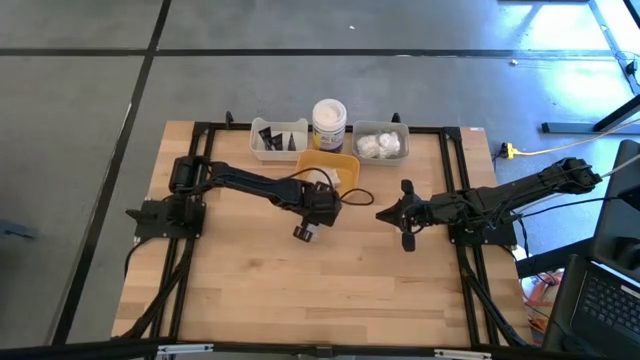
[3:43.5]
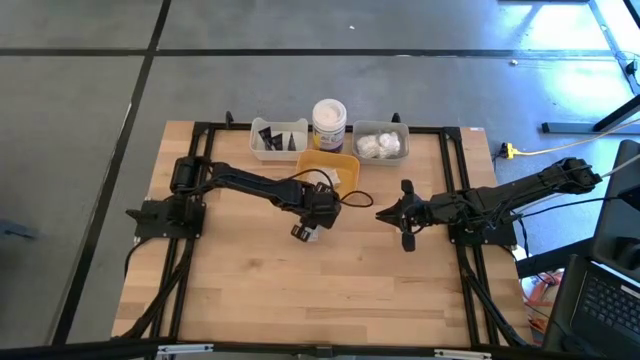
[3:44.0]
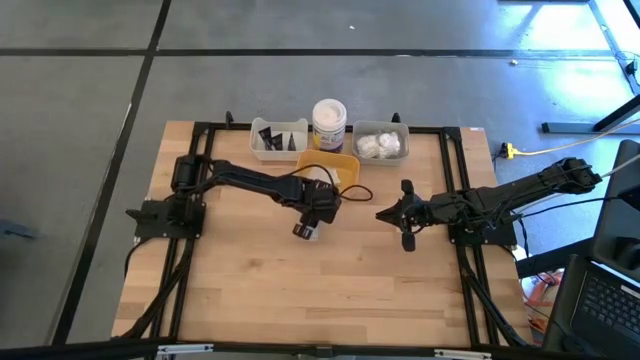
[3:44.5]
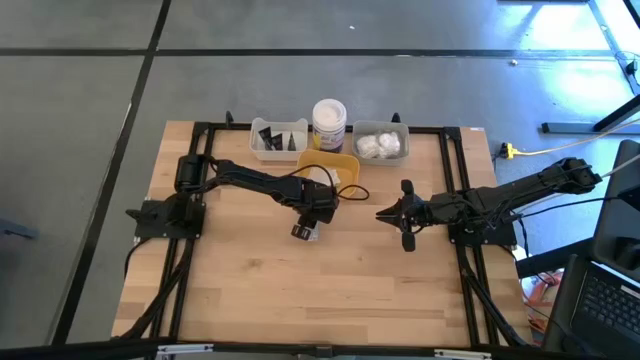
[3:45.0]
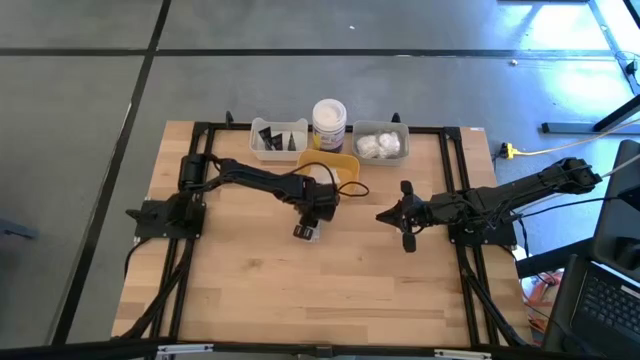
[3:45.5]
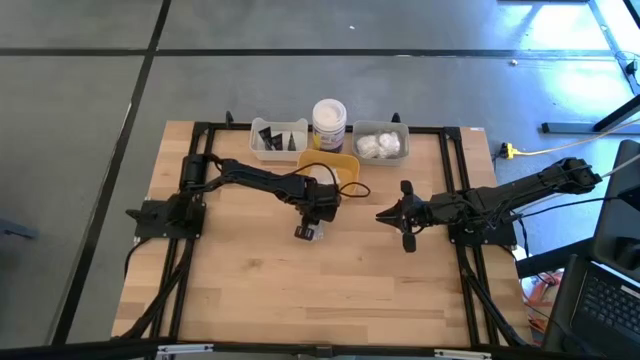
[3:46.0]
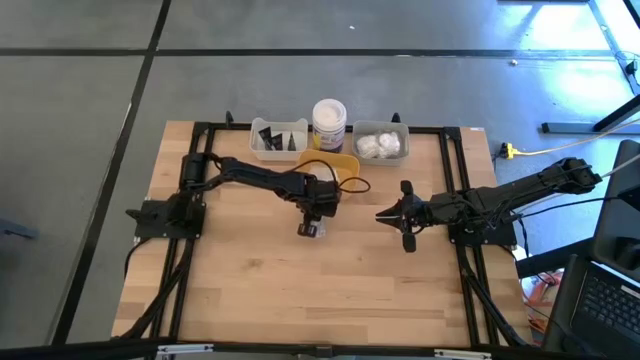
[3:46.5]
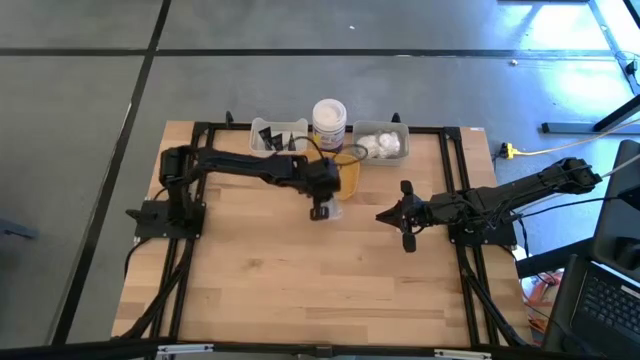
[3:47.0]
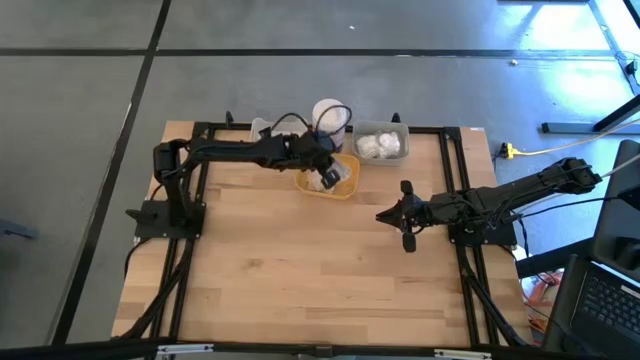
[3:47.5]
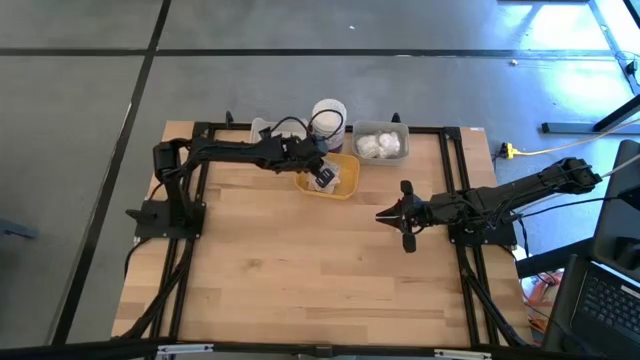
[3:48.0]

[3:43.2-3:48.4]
Task: Pick & Place Travel size toiletries
Put the white bandage into the yellow bin

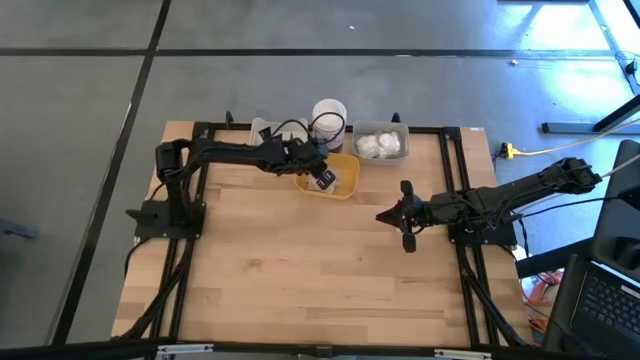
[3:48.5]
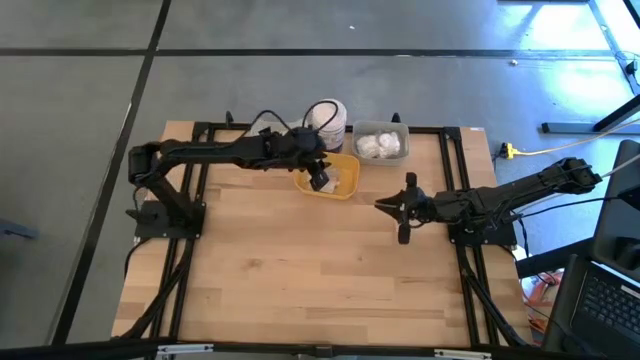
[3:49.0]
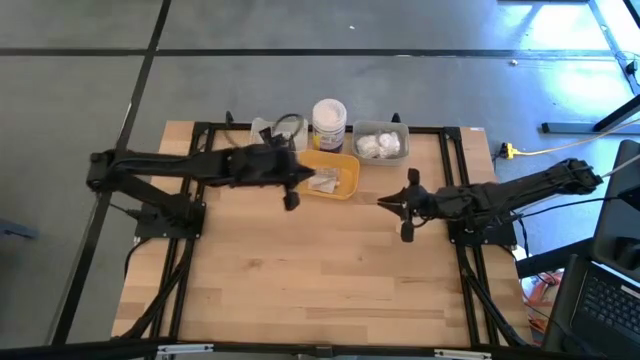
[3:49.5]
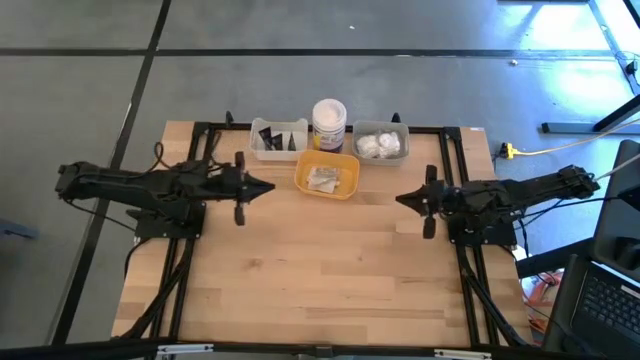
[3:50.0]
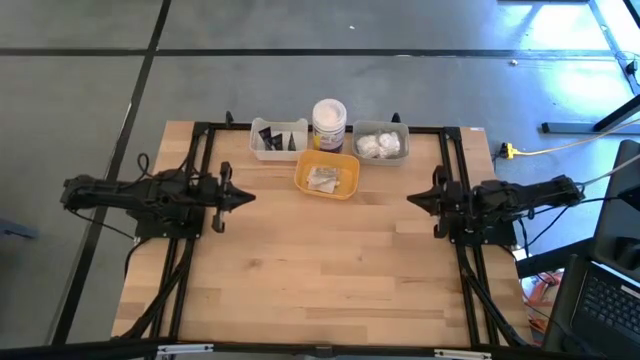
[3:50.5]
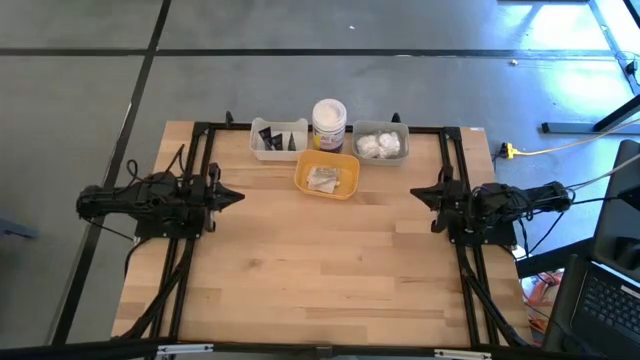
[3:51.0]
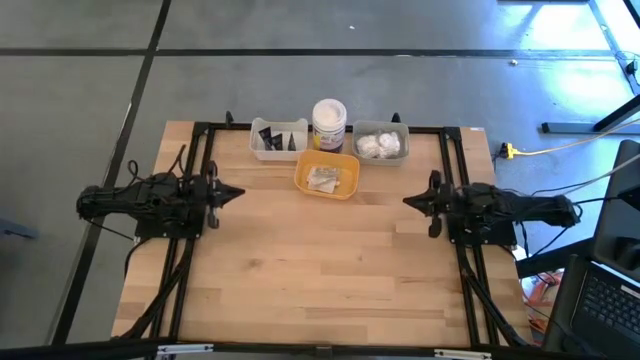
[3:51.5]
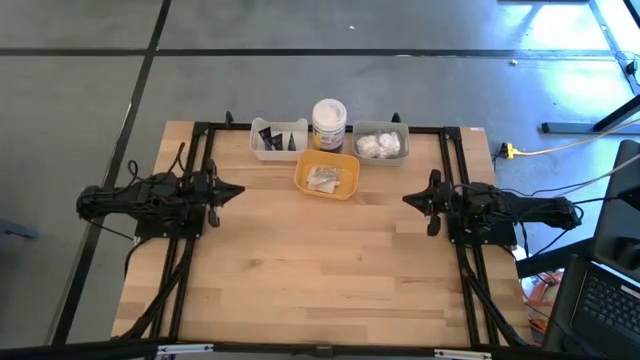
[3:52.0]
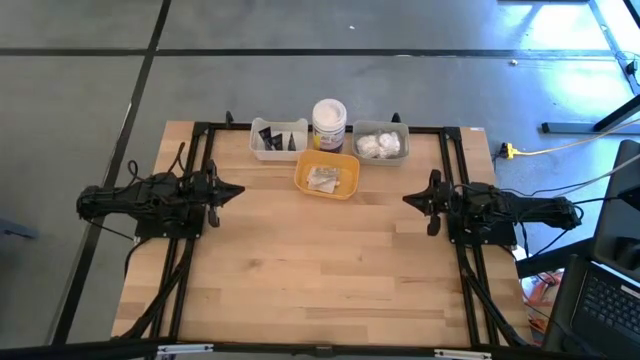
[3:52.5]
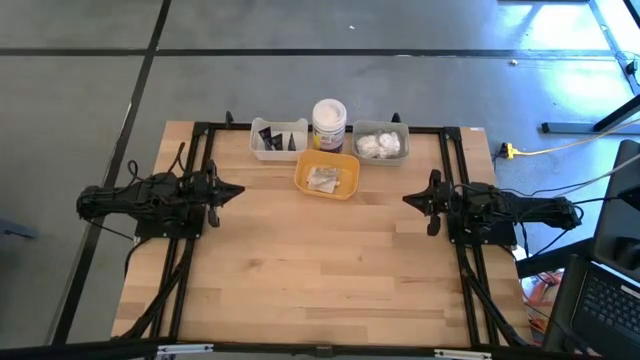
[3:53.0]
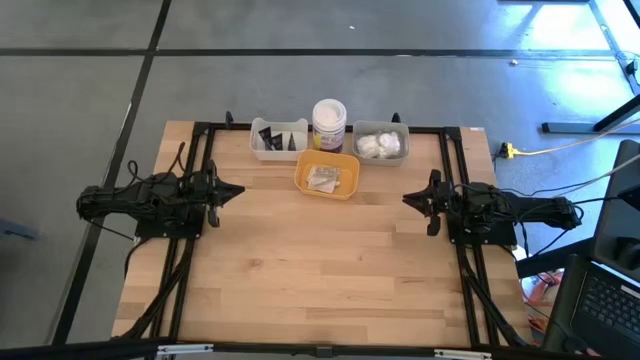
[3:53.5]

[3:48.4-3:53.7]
Return to Home Position

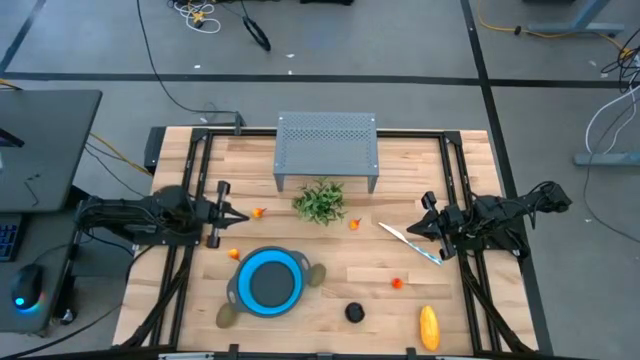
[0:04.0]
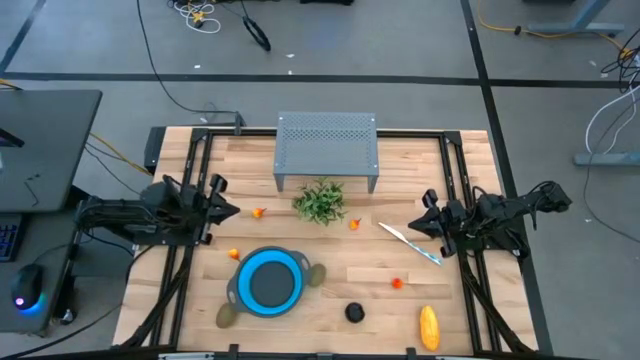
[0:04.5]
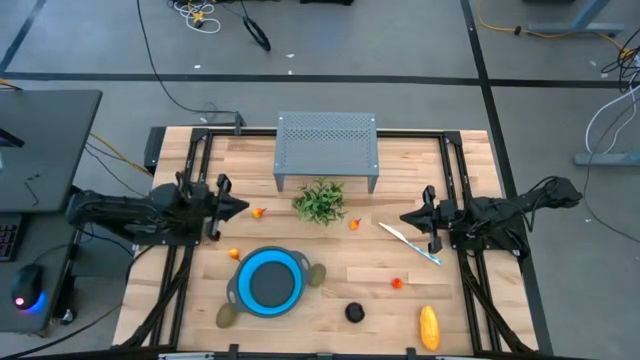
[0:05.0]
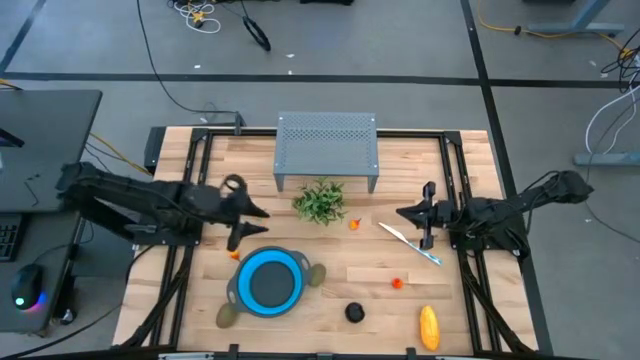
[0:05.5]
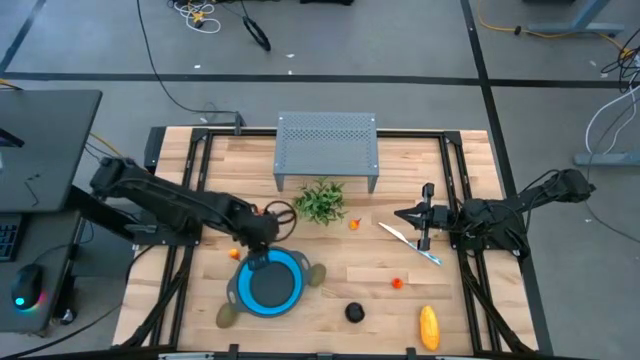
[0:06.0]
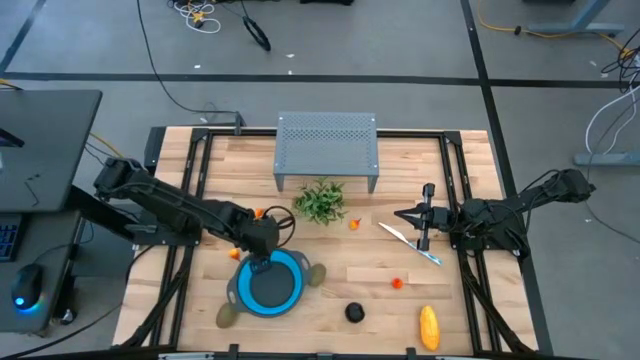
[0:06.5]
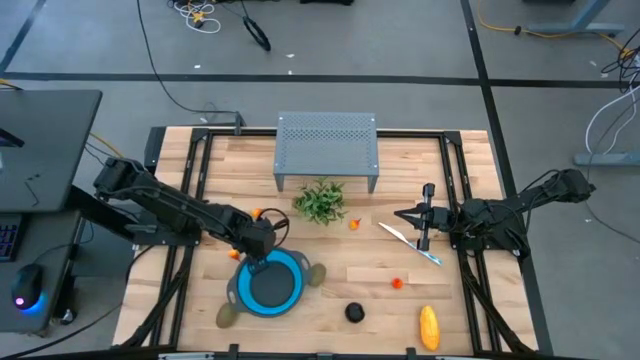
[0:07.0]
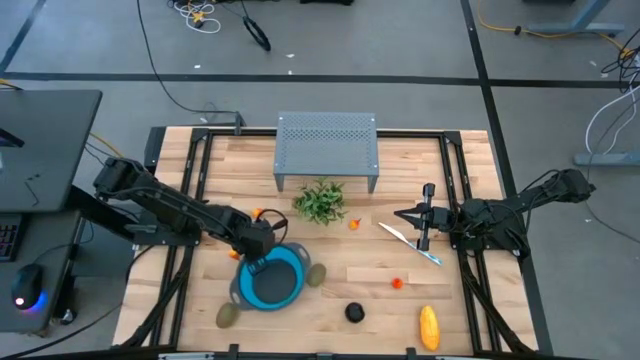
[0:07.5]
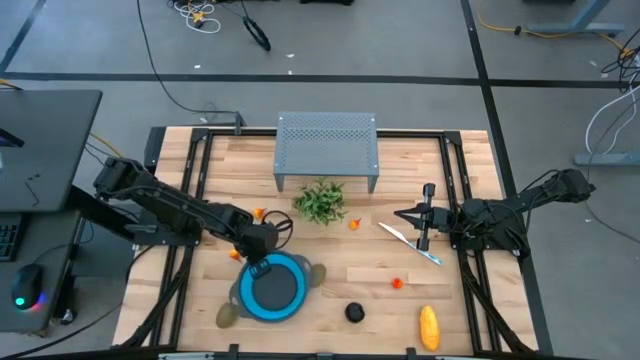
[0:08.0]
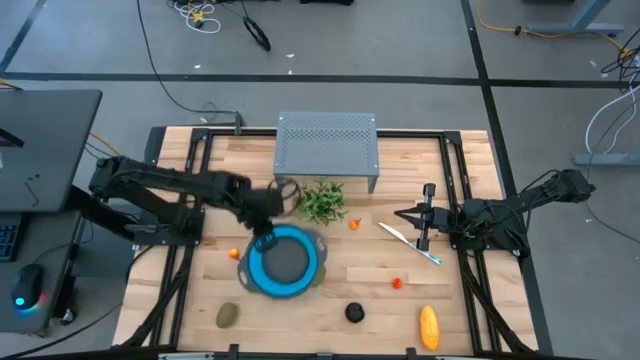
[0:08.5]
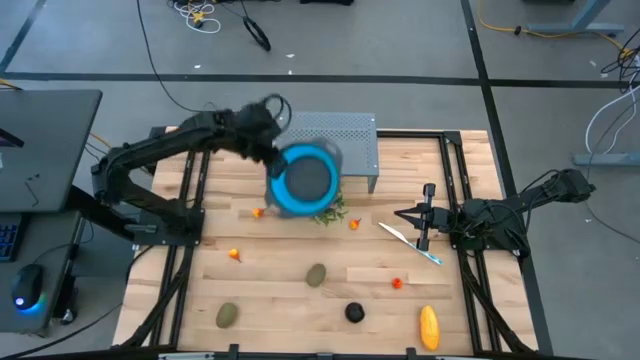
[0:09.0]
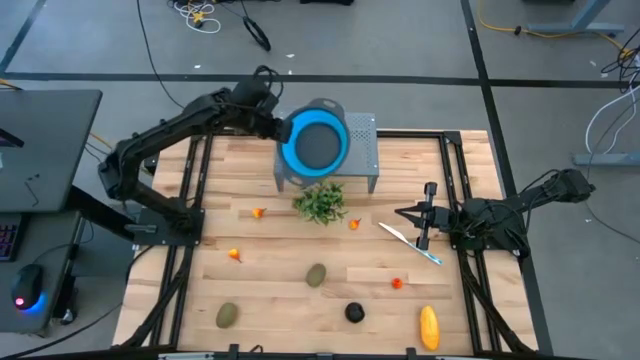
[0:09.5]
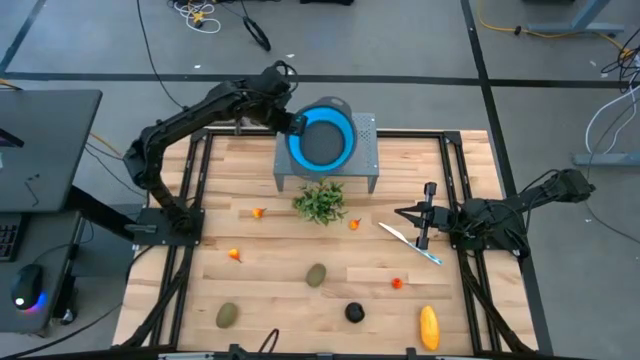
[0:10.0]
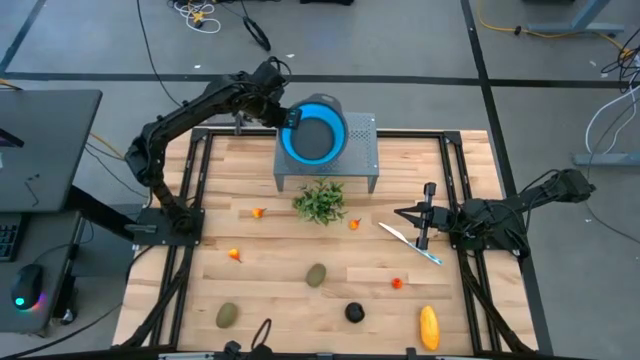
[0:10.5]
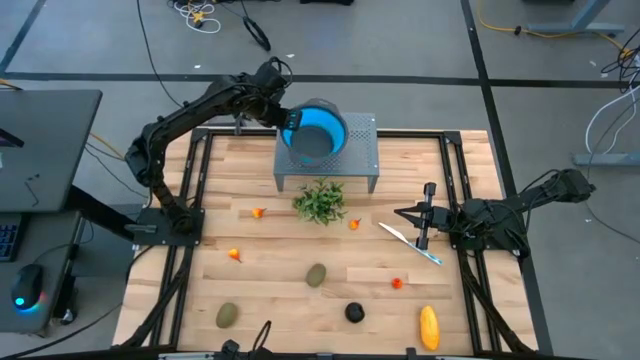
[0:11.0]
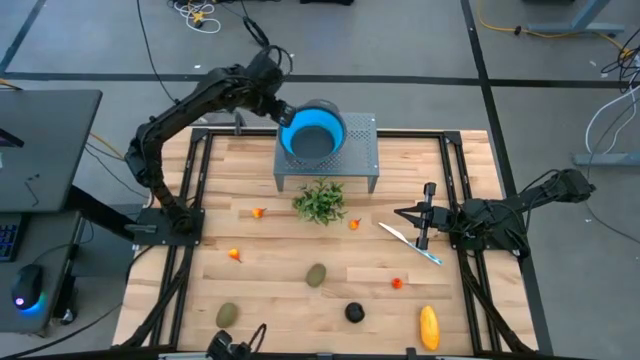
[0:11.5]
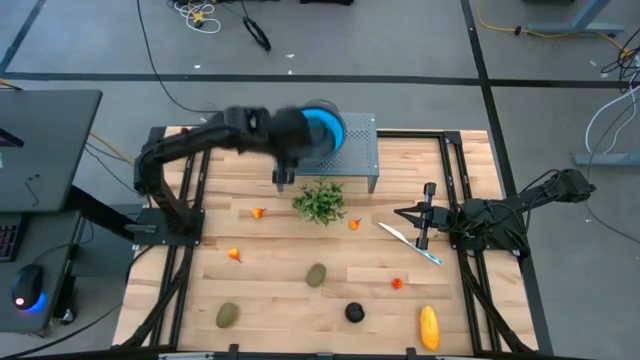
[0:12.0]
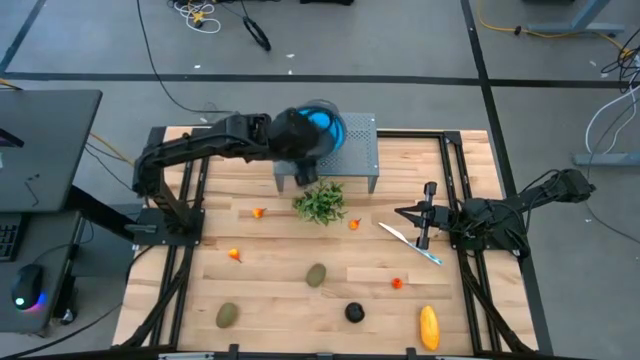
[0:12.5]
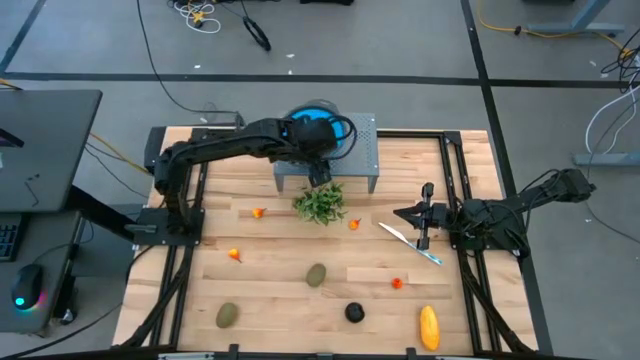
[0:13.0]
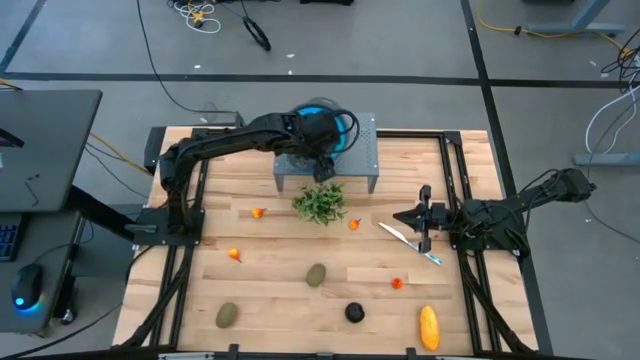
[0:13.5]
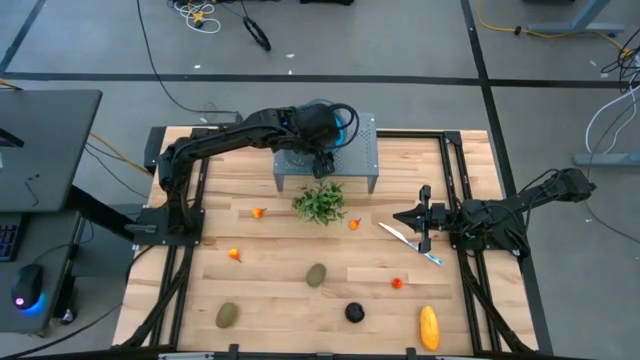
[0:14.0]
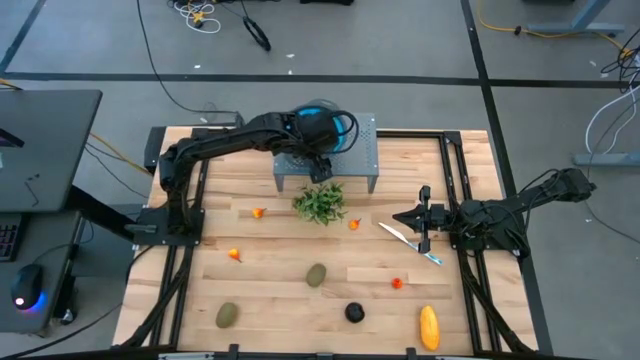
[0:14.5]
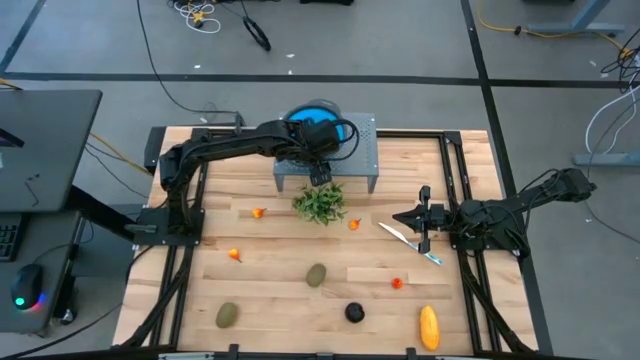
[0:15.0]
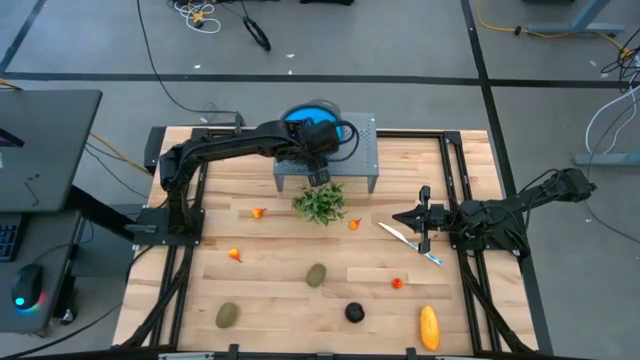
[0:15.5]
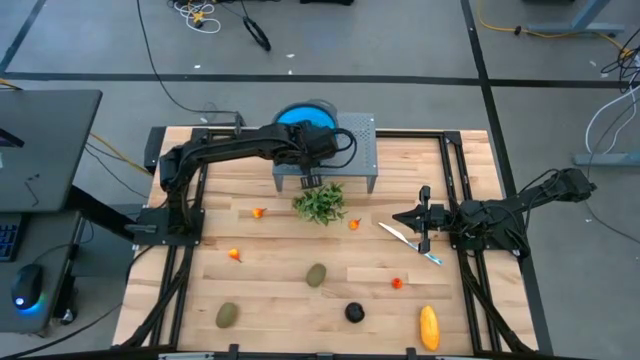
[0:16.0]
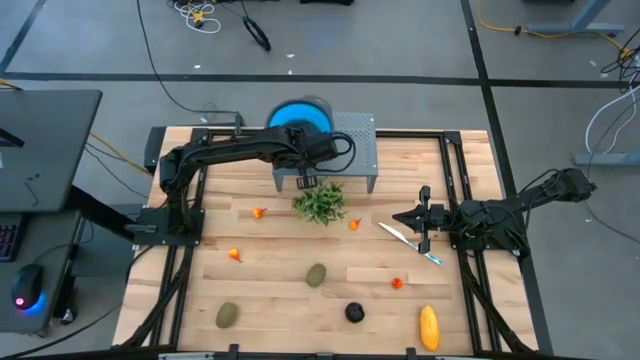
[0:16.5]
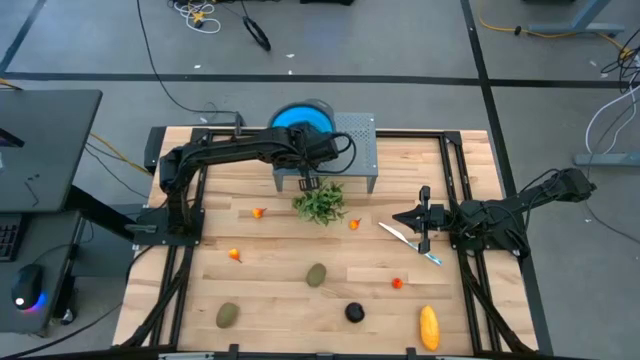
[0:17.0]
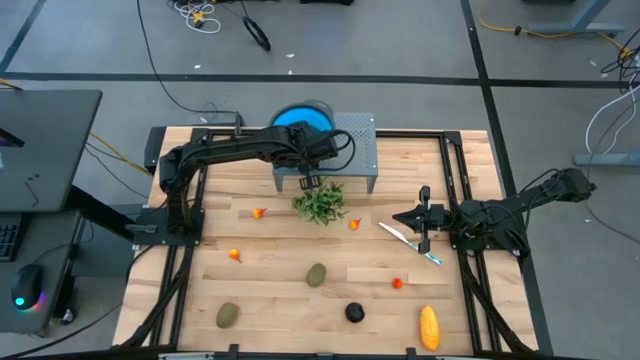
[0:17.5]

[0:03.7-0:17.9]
Task: Pick & Place Fruit
Put the blue strainer bowl on the shelf
